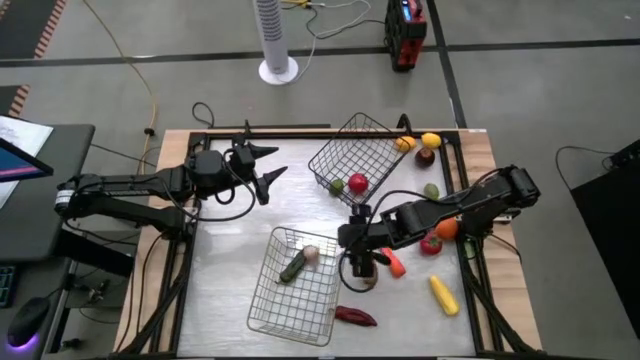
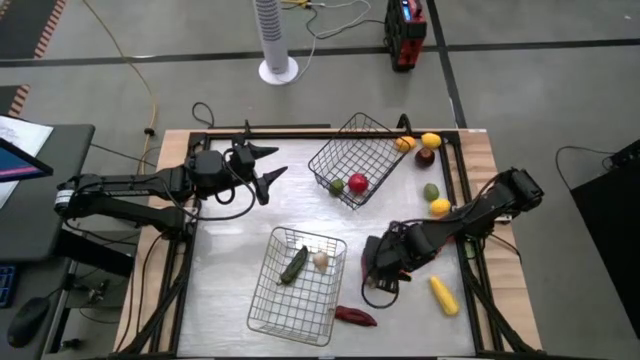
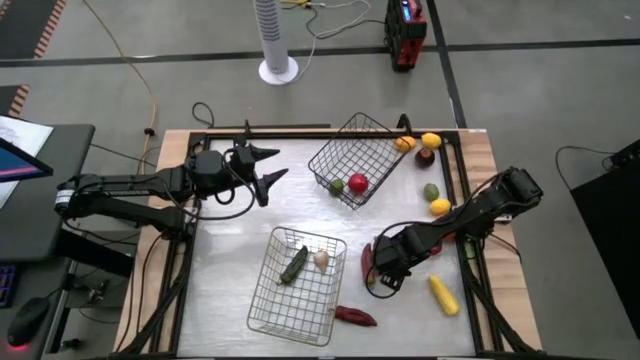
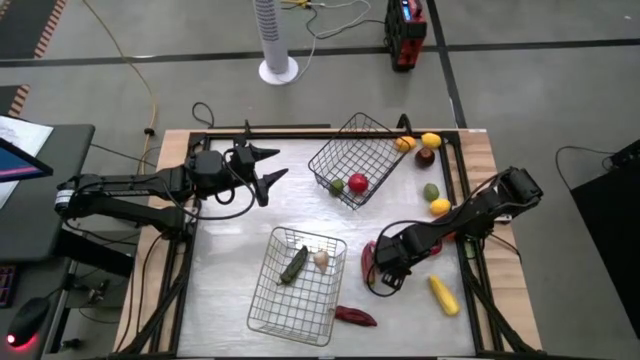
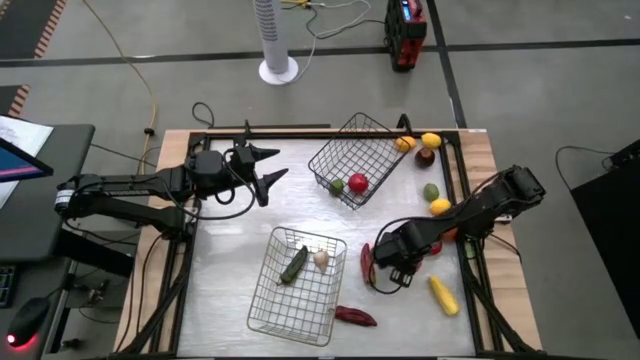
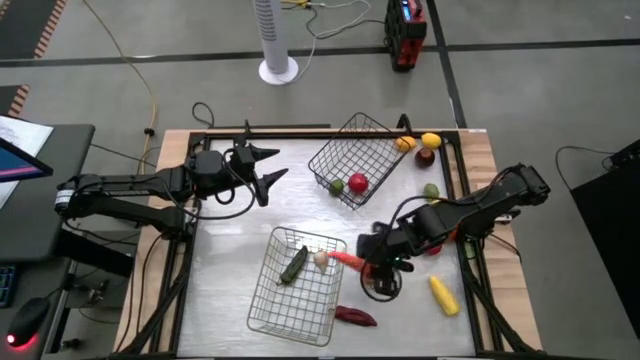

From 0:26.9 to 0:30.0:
Task: Sort produce into baskets
Put the orange carrot into the gold basket

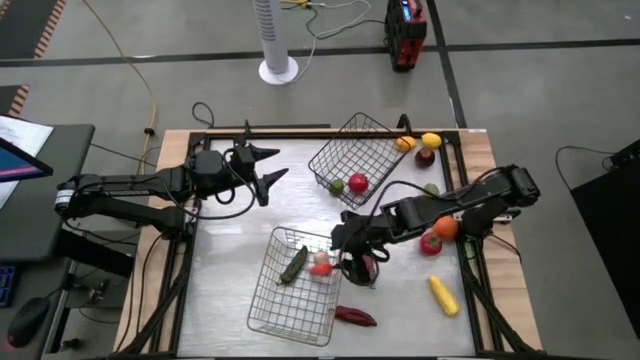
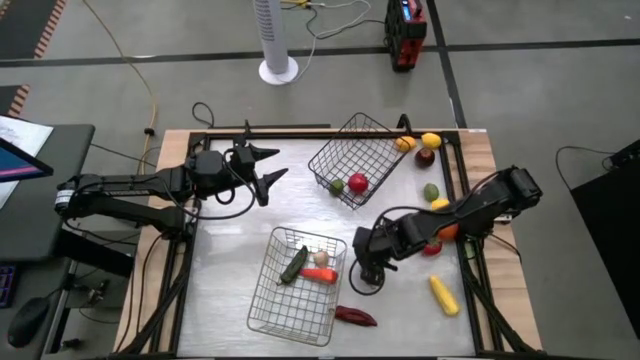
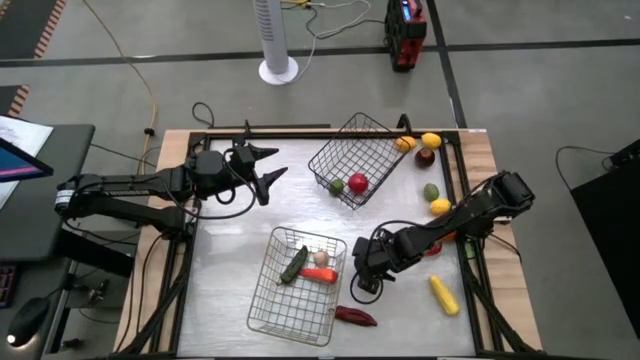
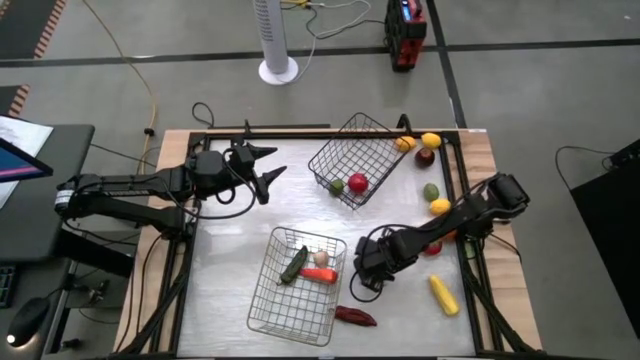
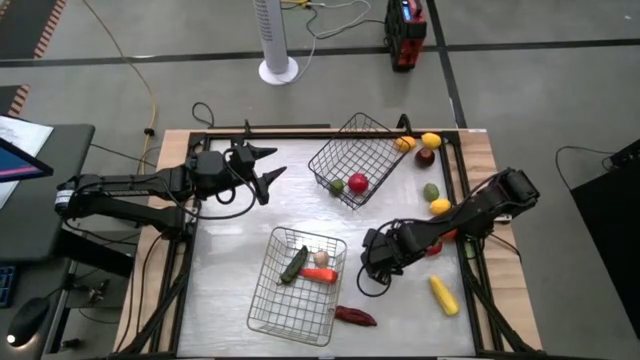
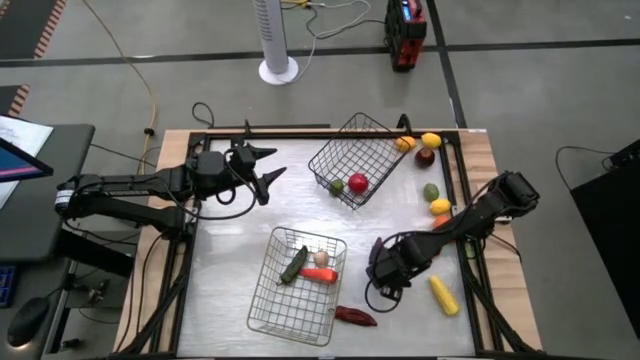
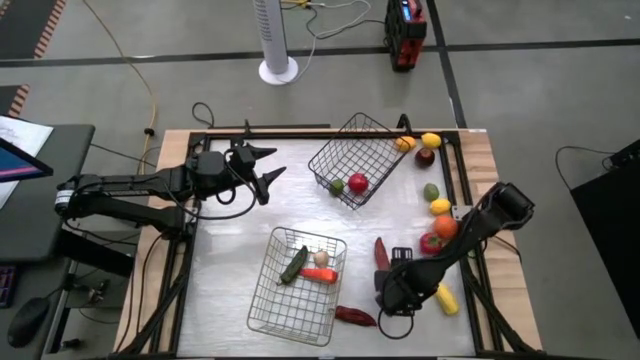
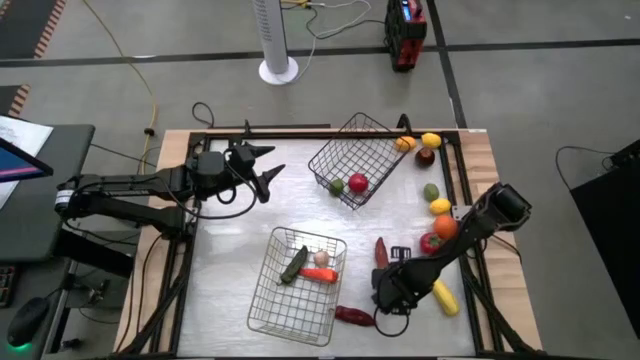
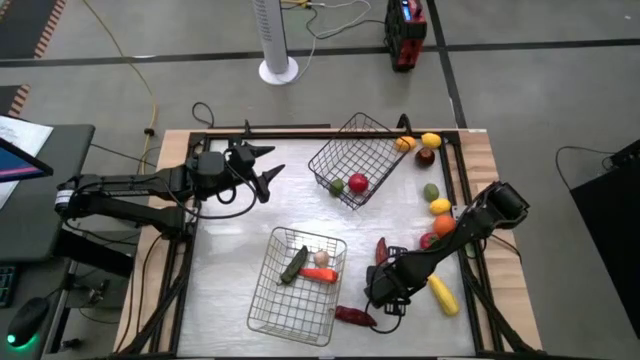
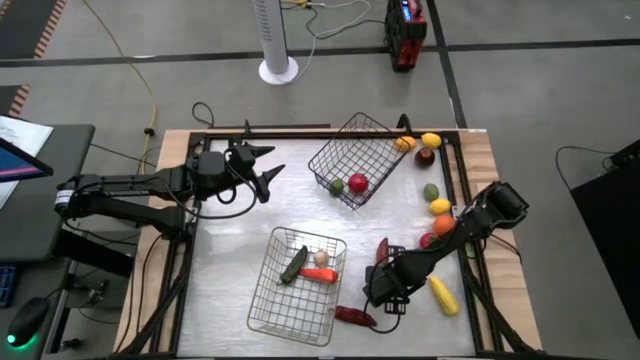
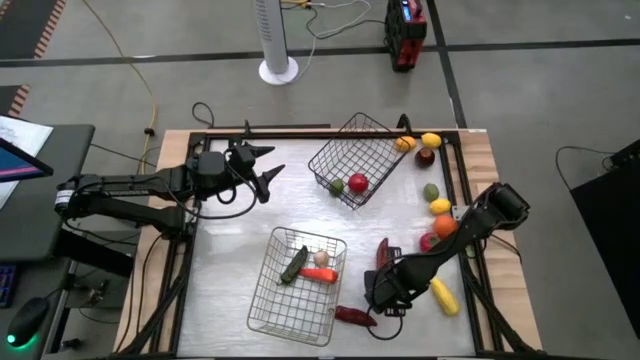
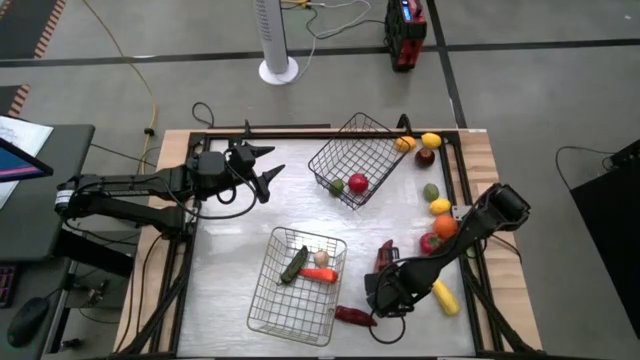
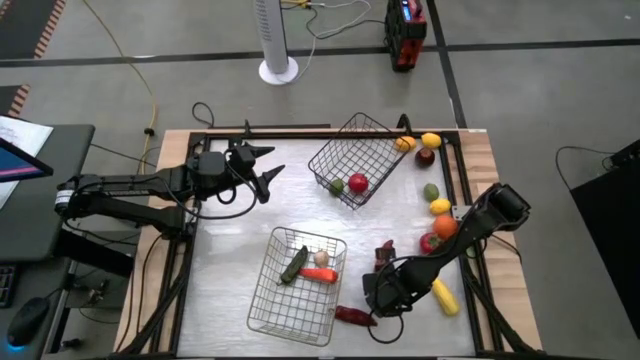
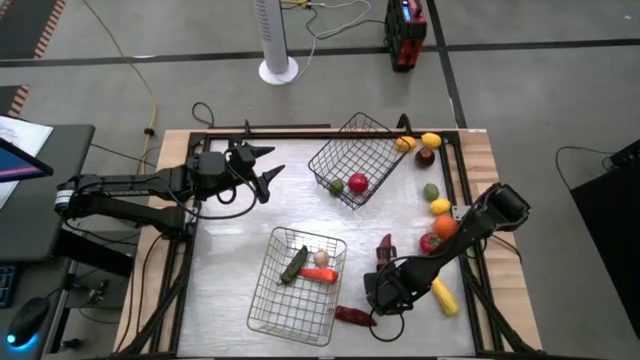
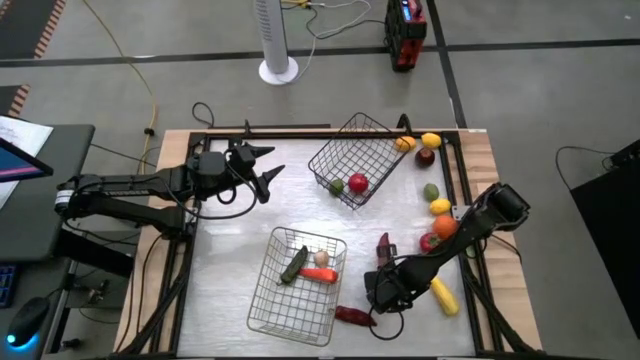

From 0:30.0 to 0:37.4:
Put the top red chili pepper into the gold wire basket

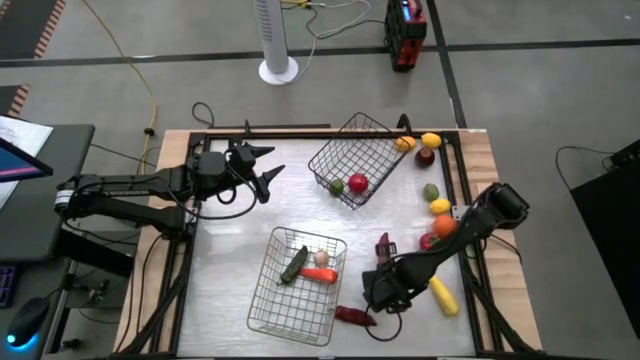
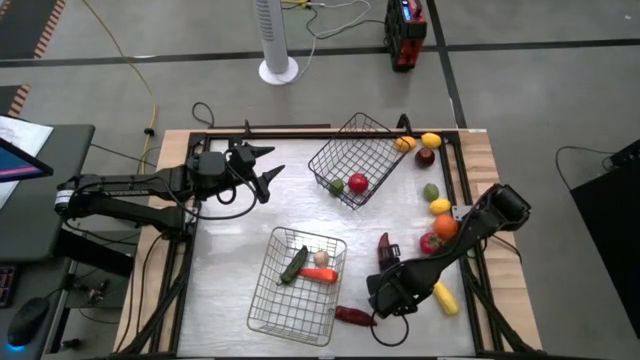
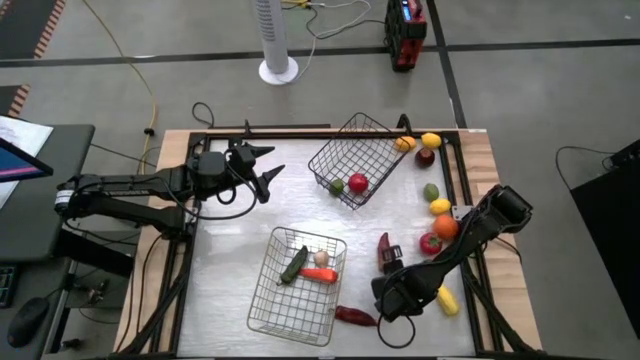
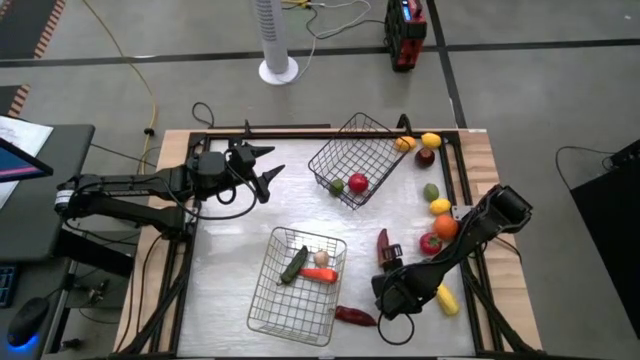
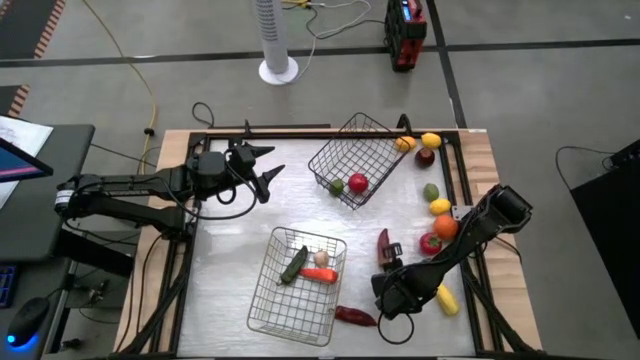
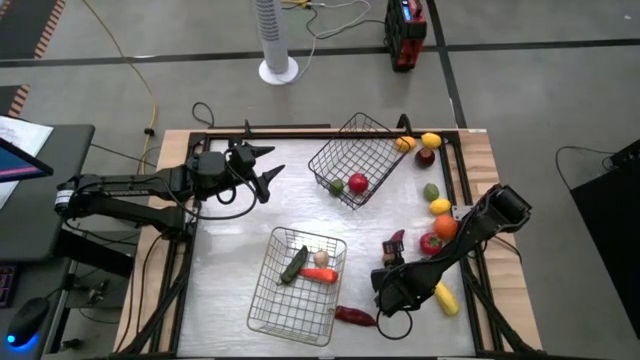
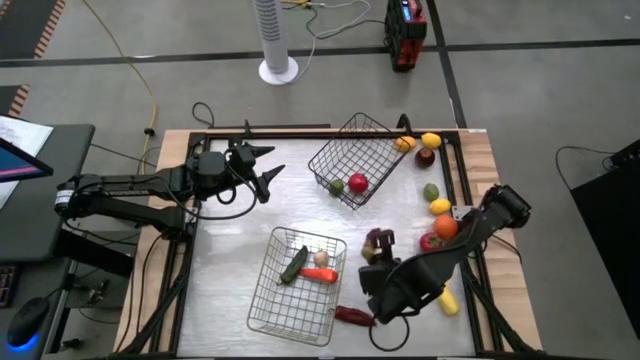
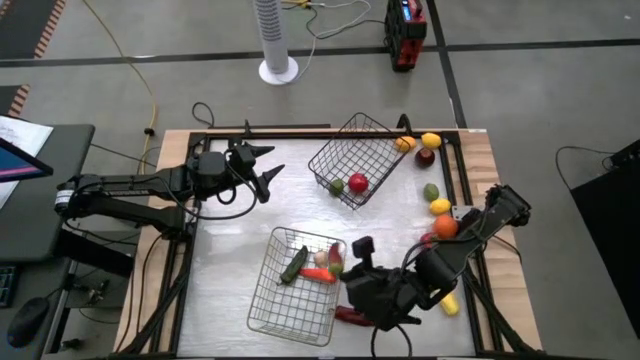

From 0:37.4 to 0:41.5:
Put the top red chili pepper into the gold wire basket

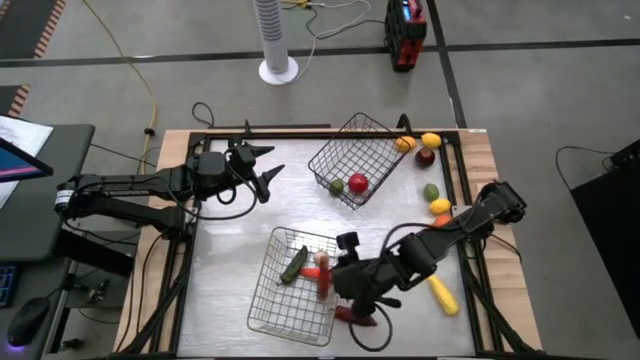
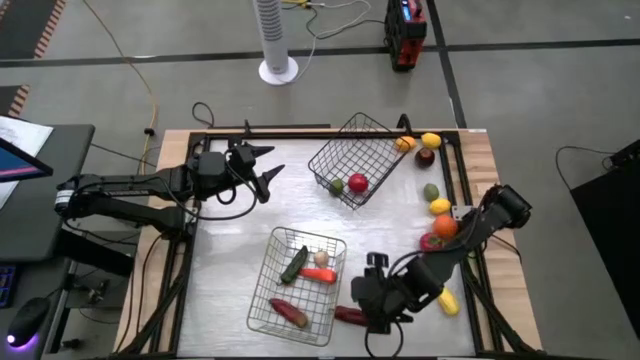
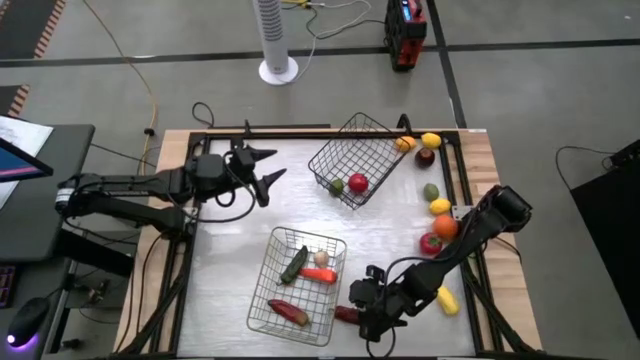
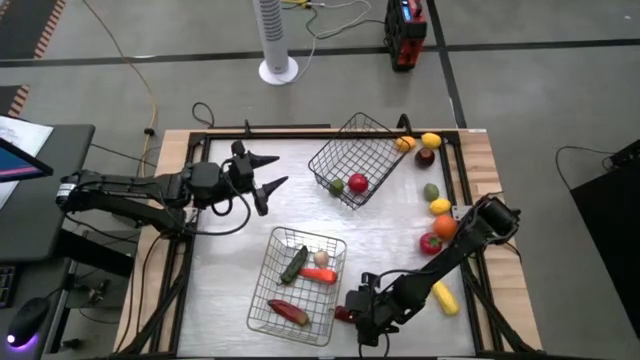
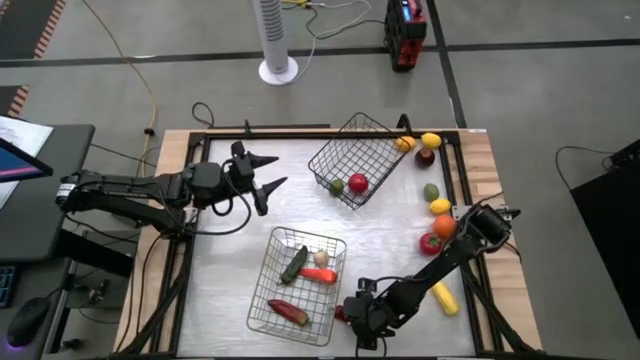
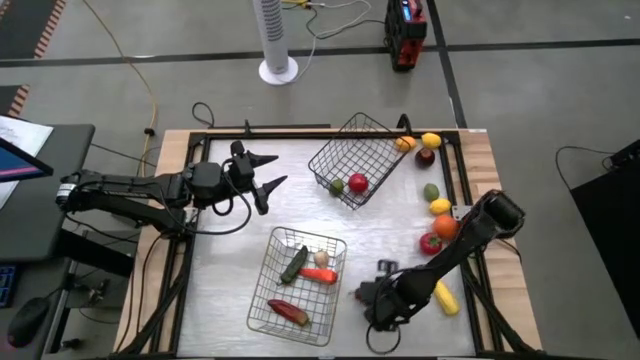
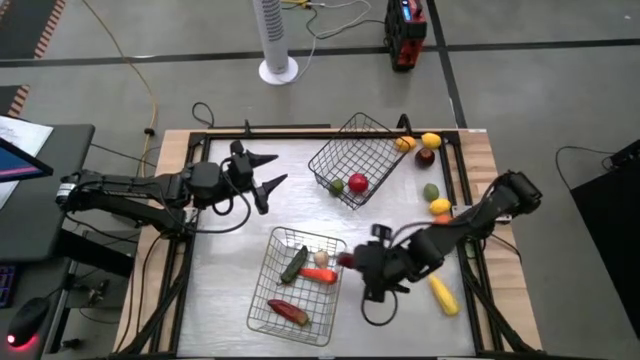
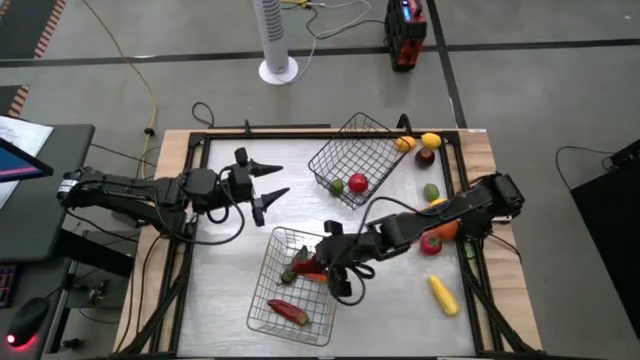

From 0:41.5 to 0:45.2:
Put the red chili pepper into the gold wire basket

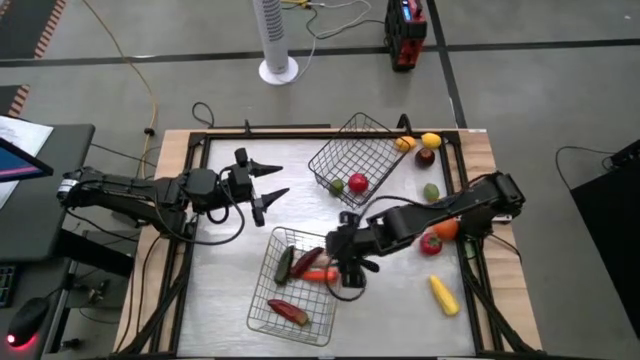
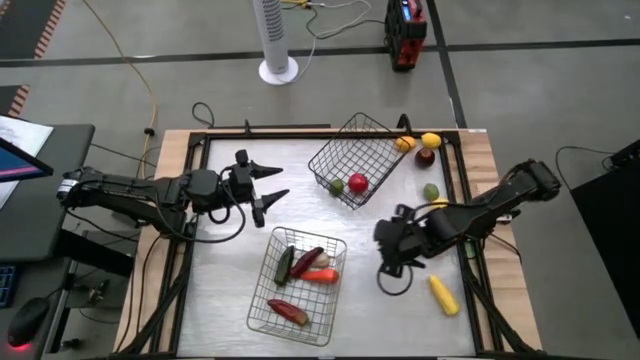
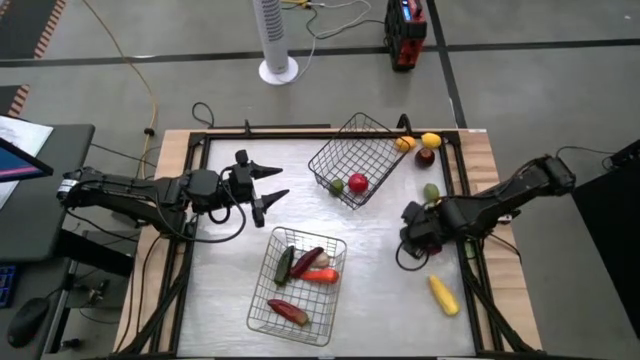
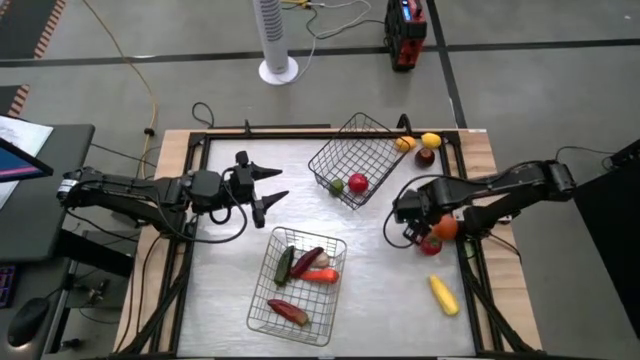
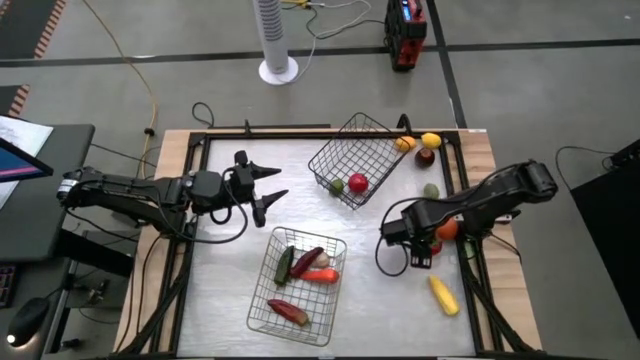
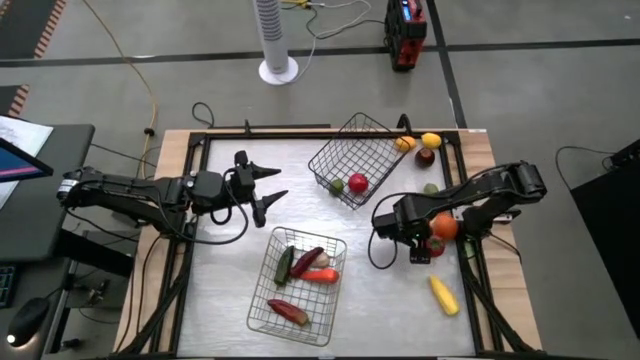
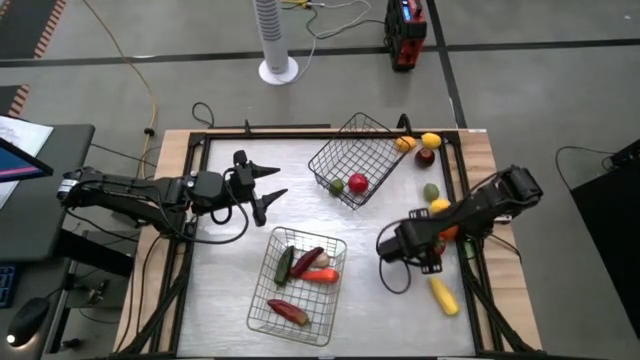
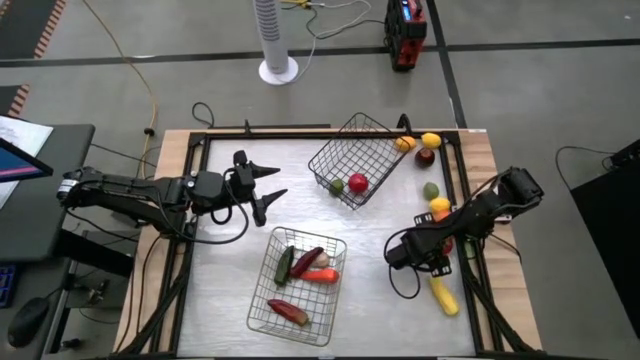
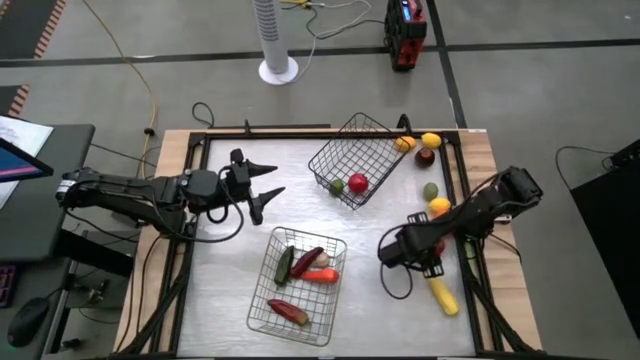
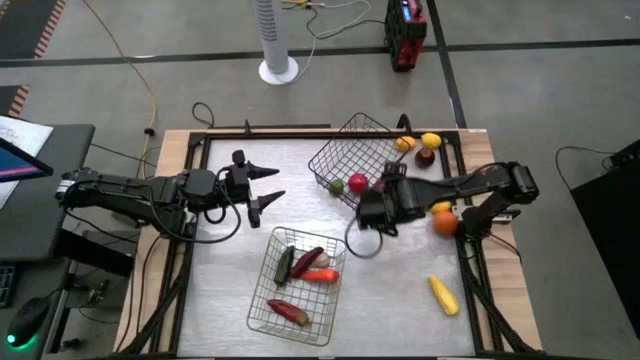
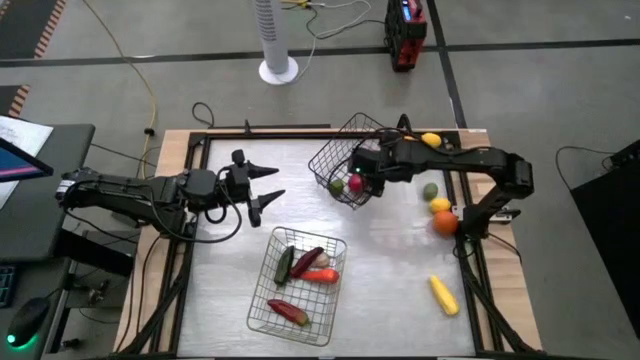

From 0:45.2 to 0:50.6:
Put the red tomato into the black wire basket
